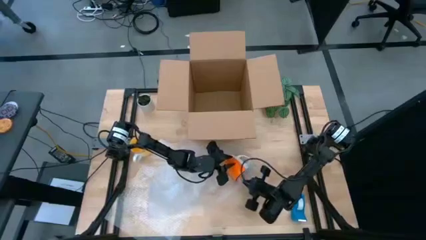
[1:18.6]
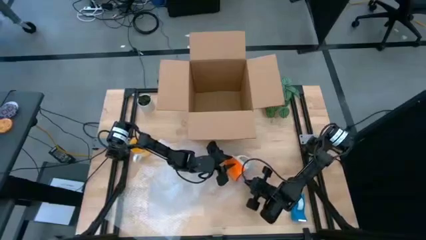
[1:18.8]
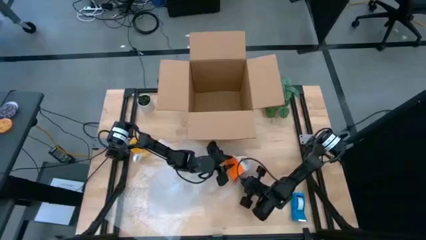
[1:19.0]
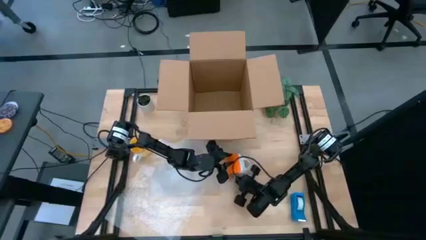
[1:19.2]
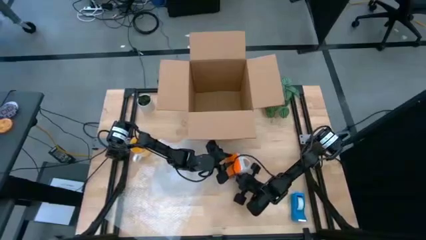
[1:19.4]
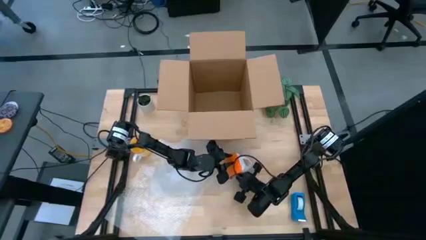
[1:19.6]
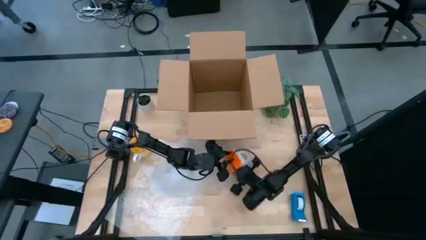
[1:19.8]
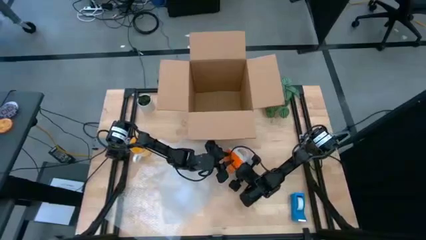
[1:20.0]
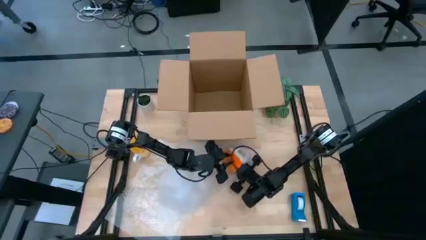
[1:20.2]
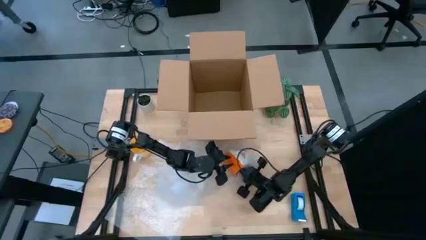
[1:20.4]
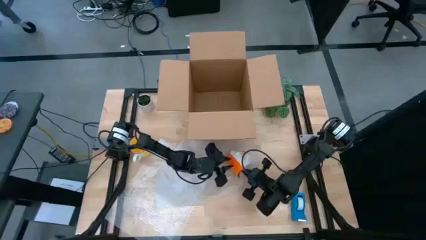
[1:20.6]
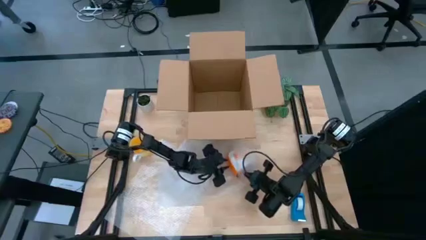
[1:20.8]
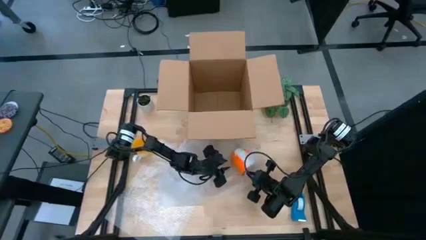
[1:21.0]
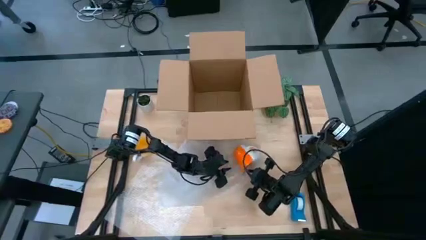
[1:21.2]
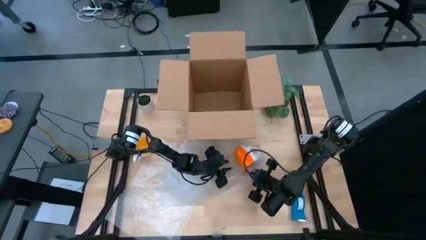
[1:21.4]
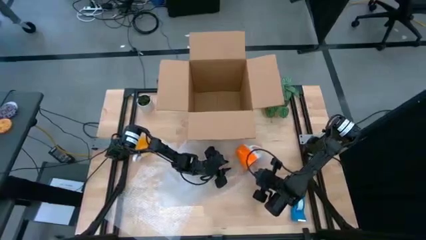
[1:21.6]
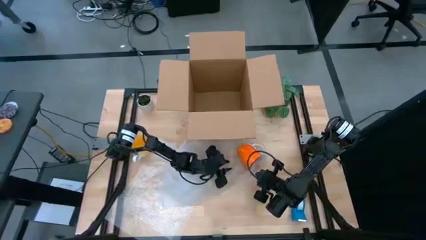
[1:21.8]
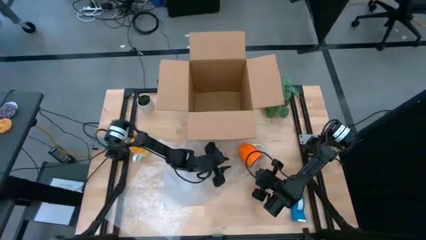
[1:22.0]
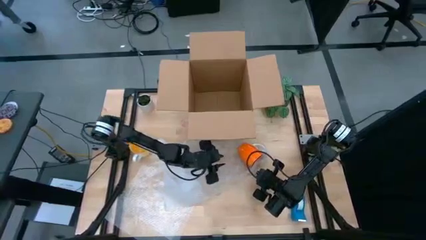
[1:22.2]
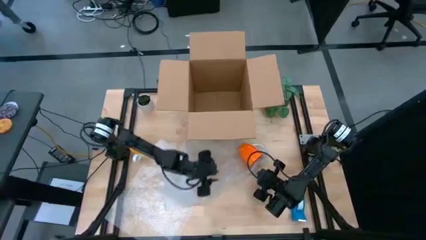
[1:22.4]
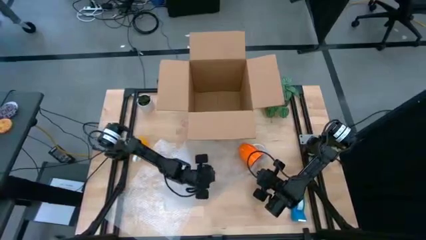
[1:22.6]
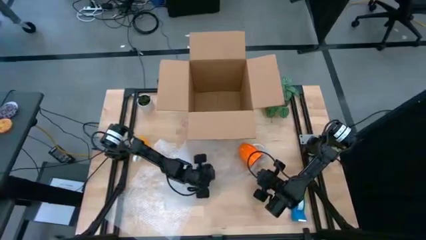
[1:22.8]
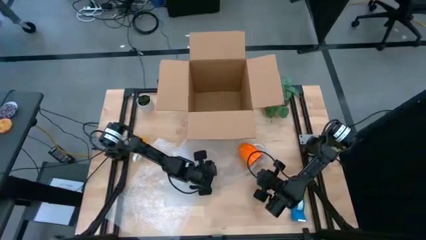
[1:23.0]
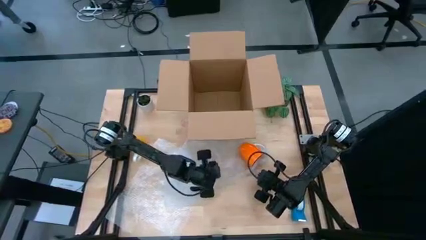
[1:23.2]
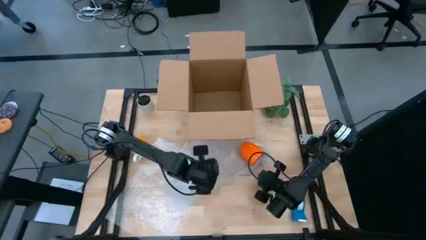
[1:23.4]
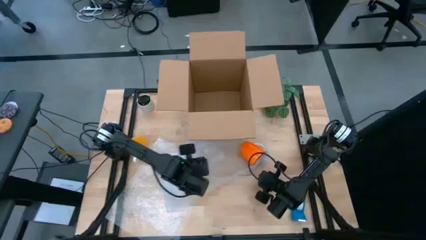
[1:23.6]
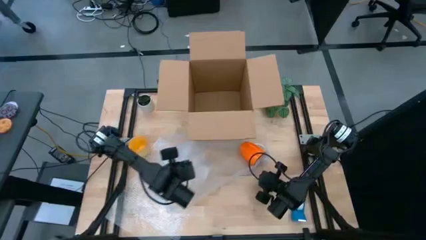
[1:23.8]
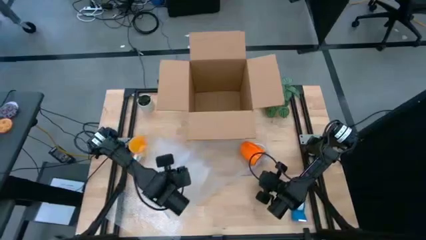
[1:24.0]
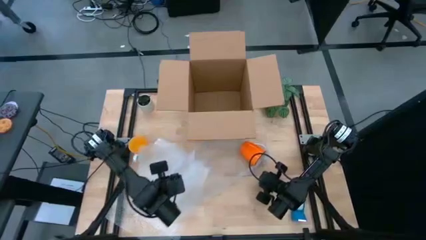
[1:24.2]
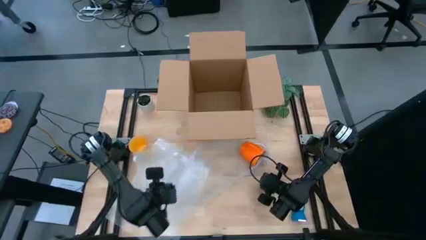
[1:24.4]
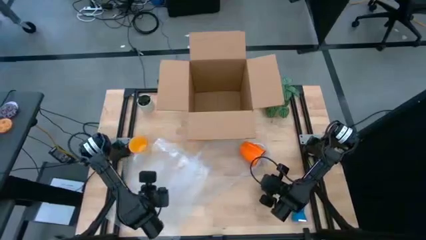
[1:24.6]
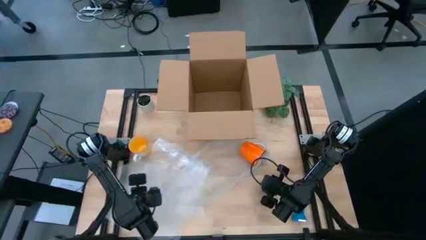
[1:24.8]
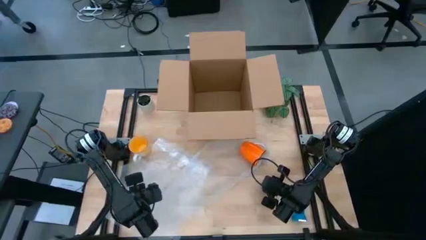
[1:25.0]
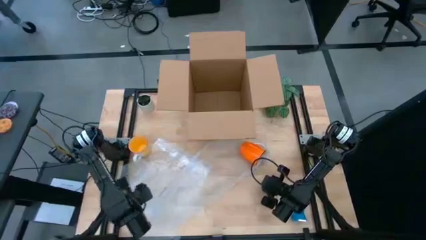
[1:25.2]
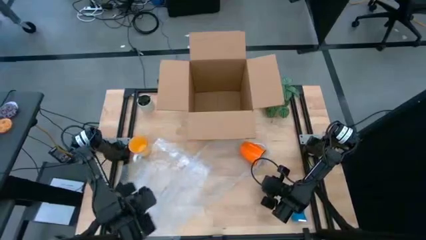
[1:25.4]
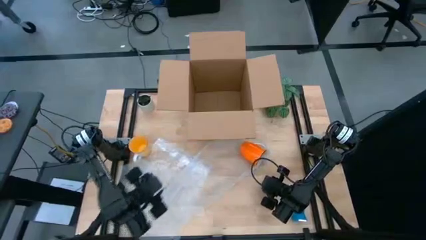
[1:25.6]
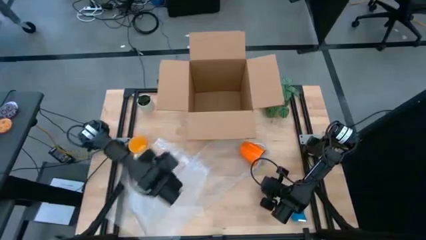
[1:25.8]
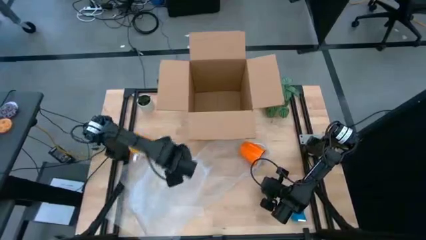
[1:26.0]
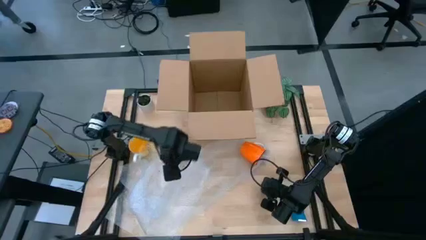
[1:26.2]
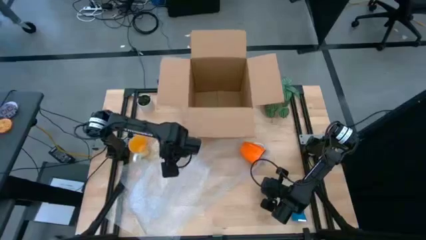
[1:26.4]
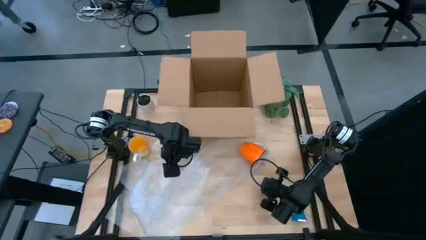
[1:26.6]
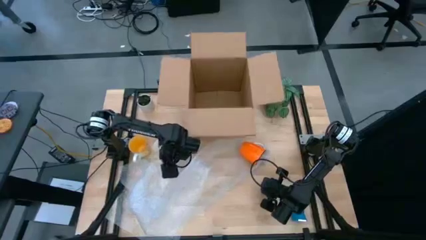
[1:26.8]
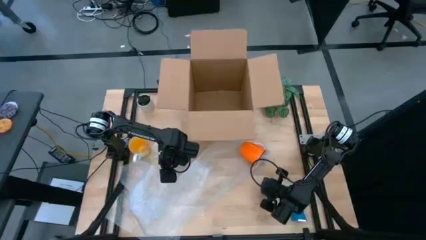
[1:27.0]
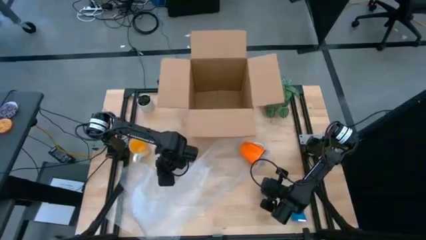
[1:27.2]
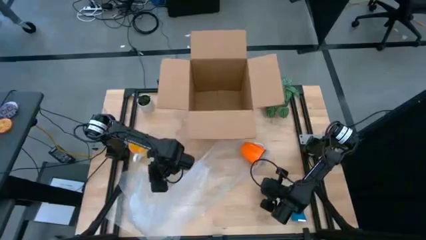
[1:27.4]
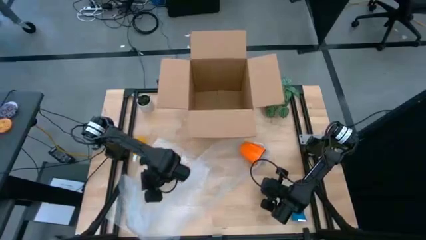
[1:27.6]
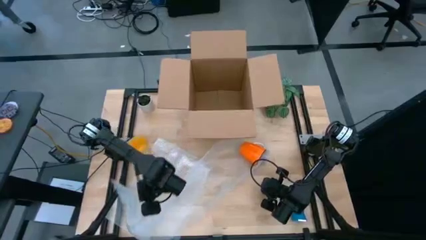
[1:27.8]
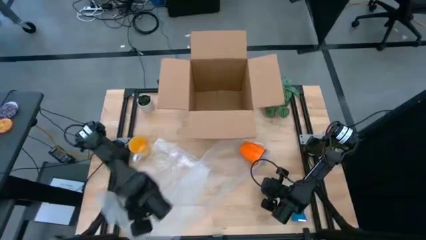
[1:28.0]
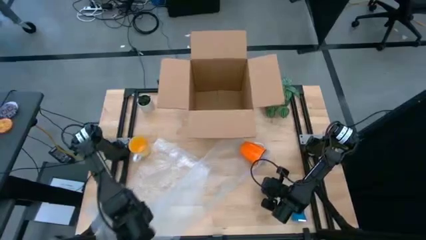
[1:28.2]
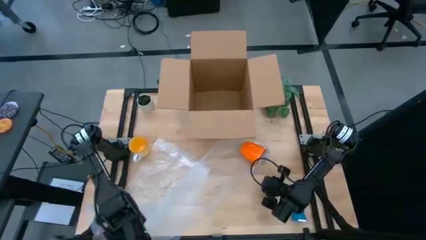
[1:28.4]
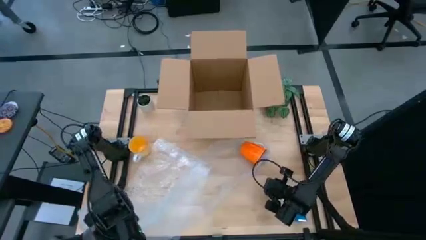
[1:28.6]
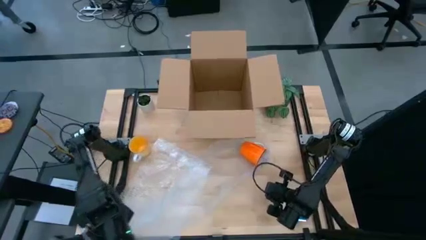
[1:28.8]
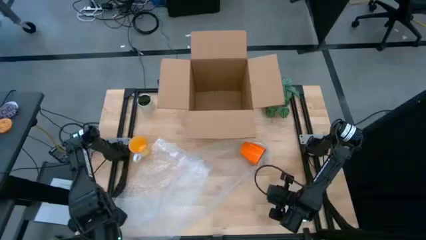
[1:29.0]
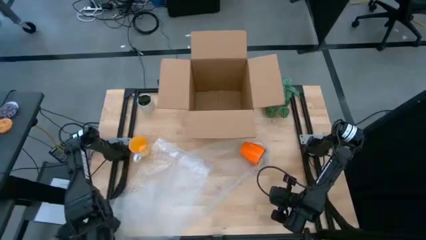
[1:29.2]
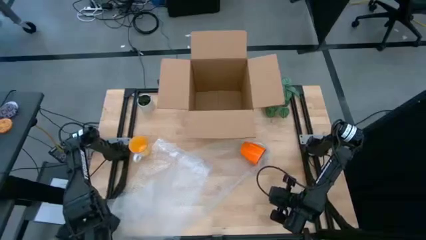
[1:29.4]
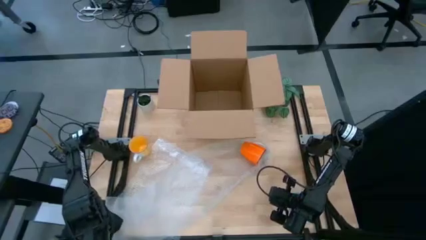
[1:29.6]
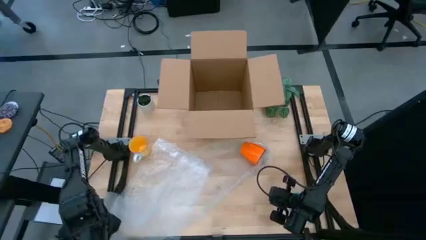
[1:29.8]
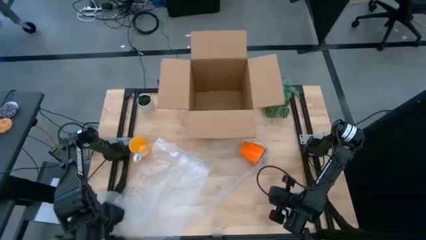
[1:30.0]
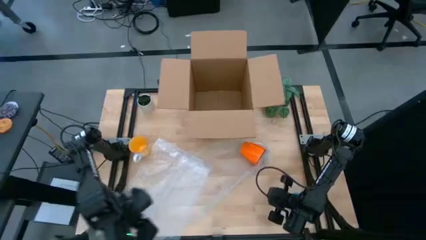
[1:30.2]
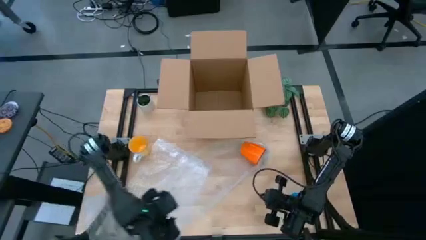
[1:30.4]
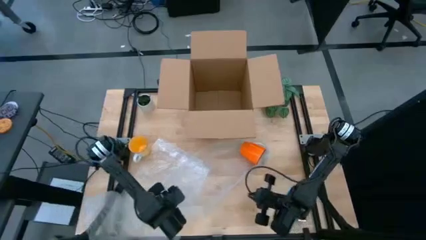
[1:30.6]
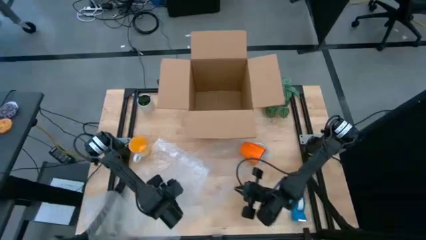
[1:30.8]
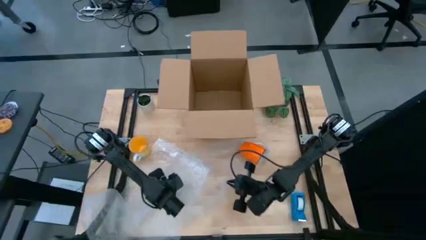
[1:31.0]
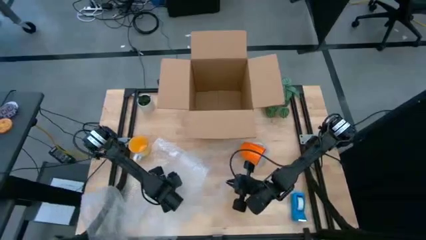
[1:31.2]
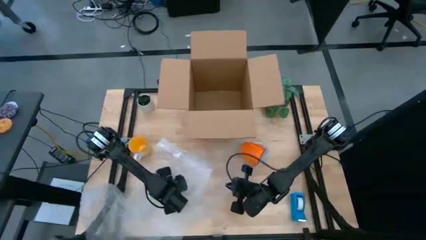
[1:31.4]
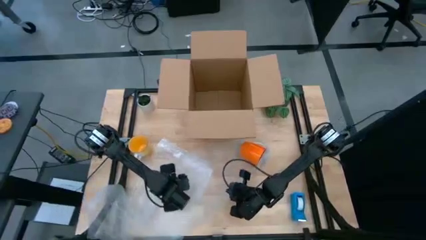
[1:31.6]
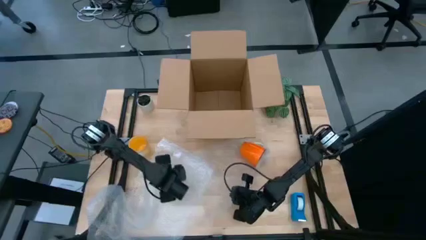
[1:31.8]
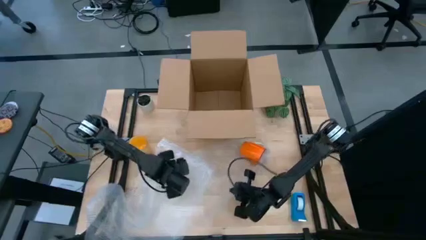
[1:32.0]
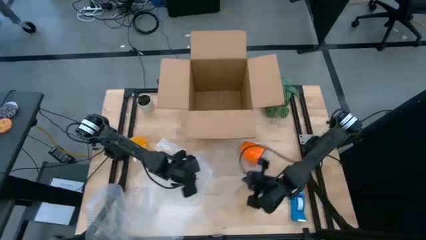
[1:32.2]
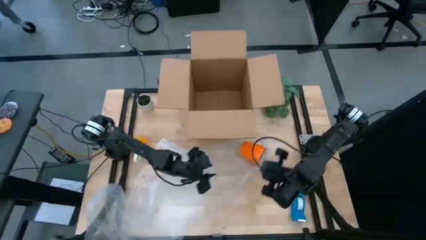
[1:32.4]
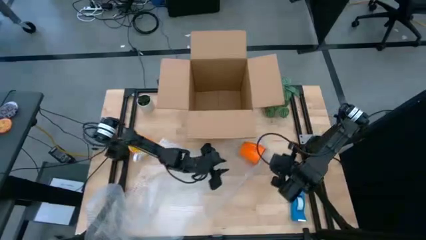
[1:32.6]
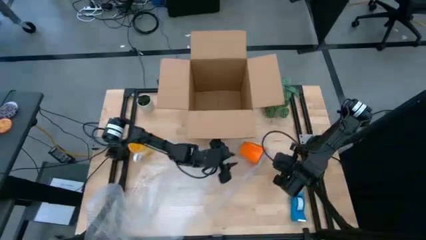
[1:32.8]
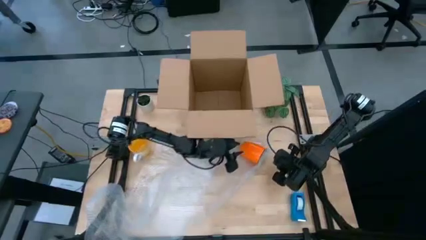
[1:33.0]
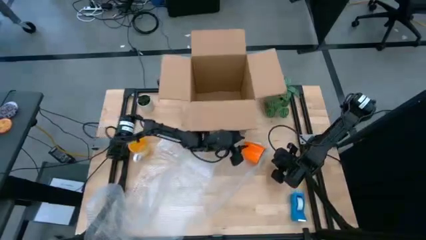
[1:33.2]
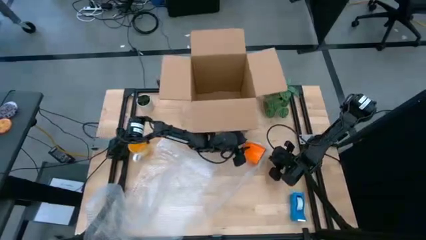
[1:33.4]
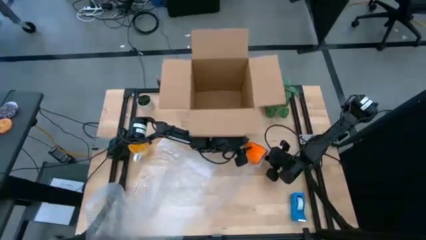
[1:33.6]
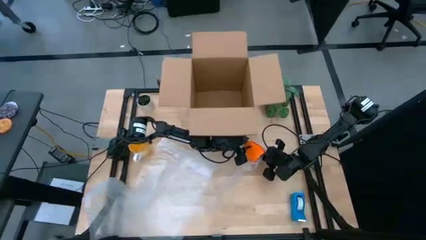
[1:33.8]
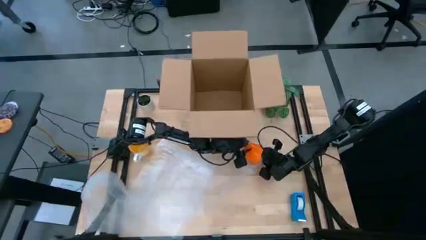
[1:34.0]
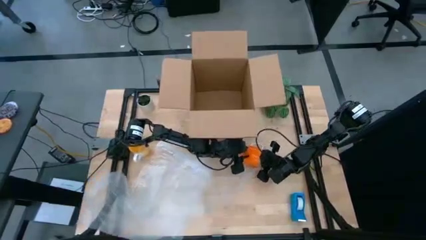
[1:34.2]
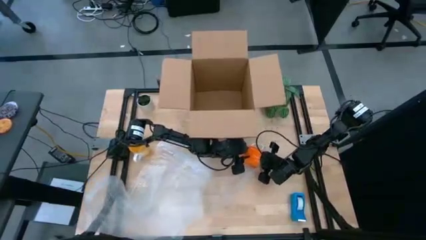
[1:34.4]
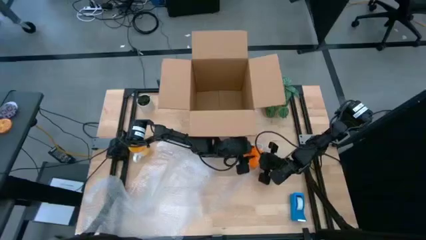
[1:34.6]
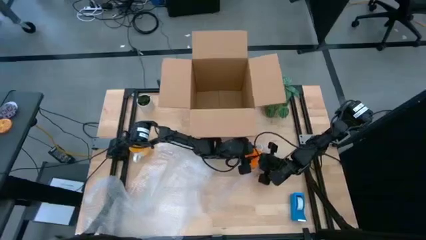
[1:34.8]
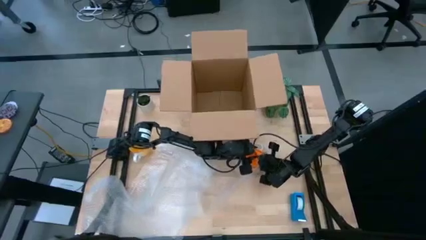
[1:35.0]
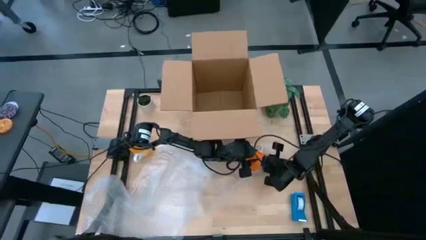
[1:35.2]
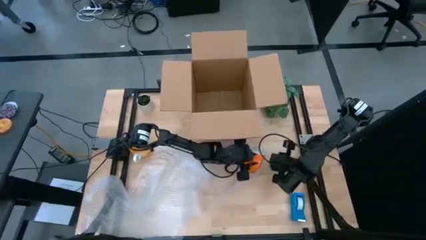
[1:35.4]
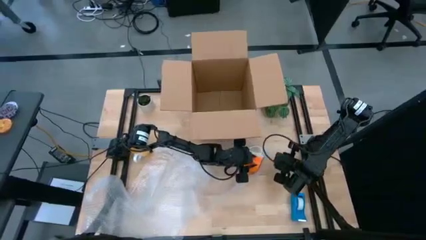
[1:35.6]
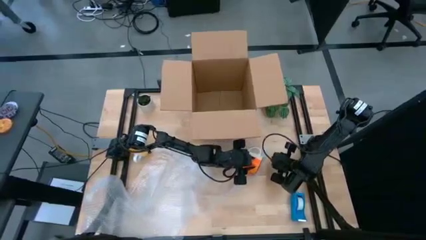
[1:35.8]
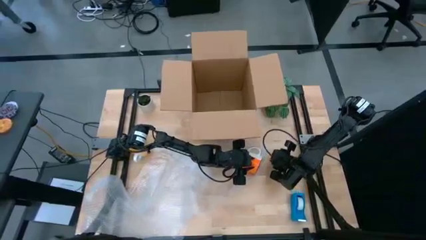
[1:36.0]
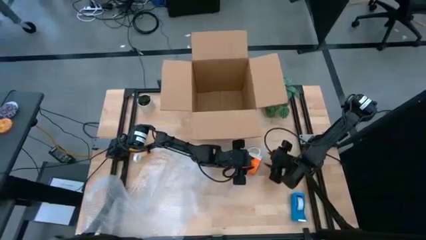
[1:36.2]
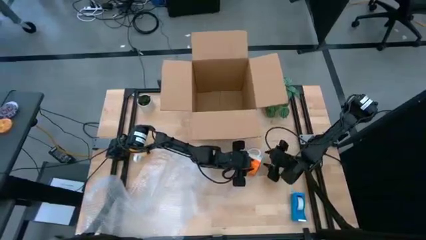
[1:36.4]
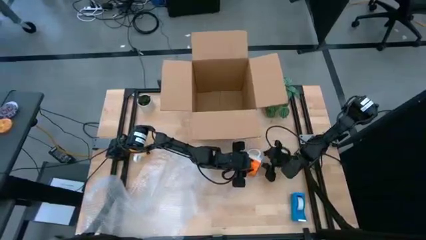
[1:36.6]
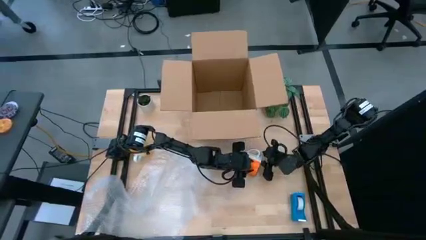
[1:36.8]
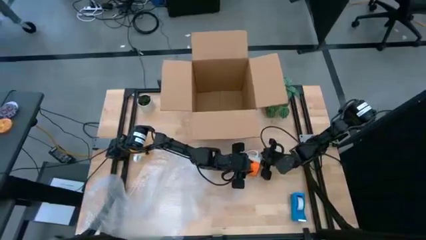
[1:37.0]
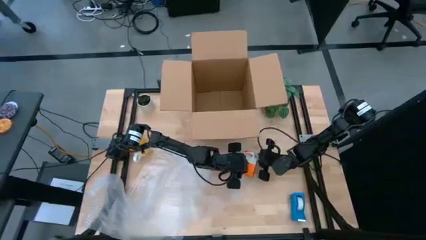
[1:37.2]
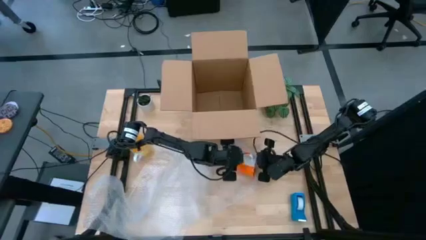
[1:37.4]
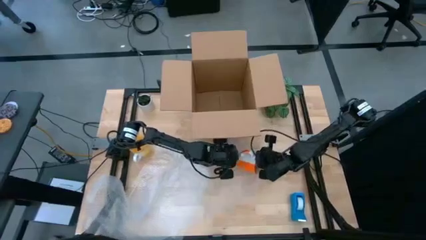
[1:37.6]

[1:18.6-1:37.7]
Task: wrap mug
Wrap the orange mug with the bubble wrap
